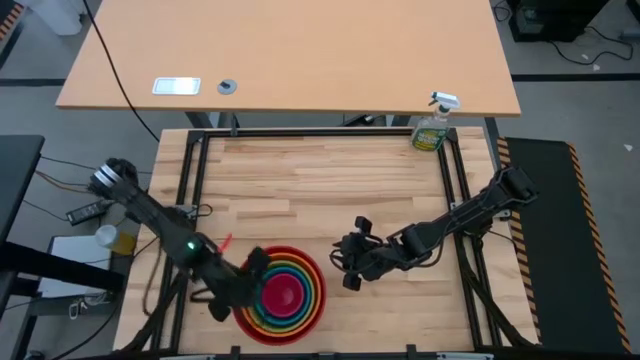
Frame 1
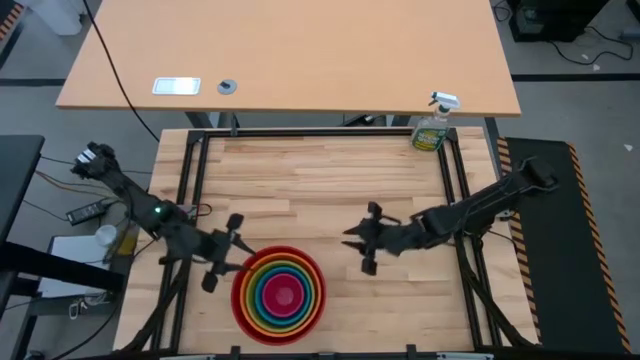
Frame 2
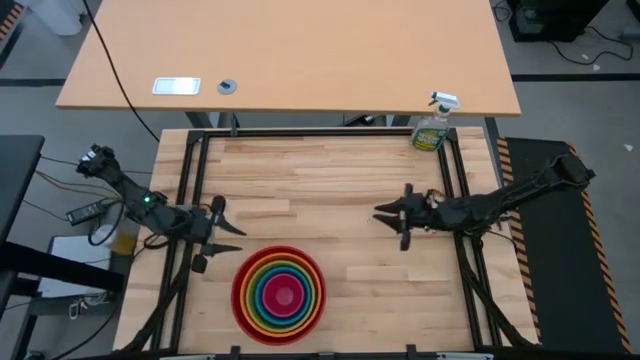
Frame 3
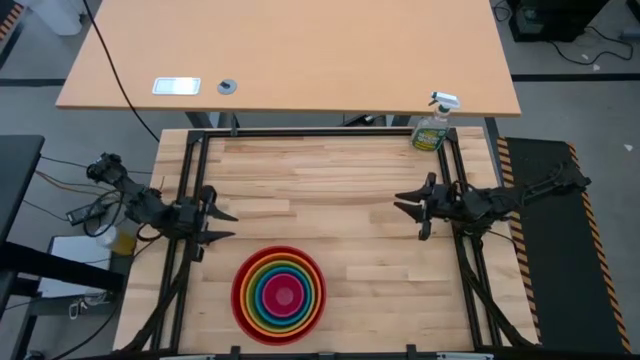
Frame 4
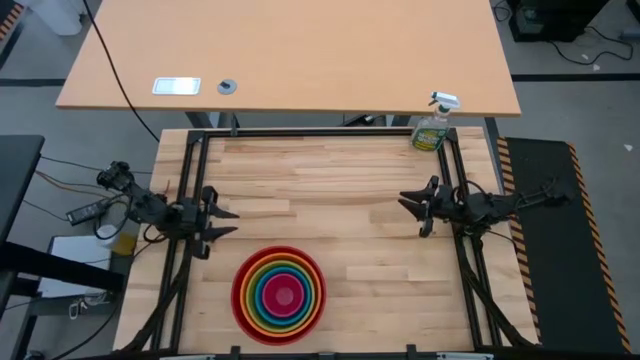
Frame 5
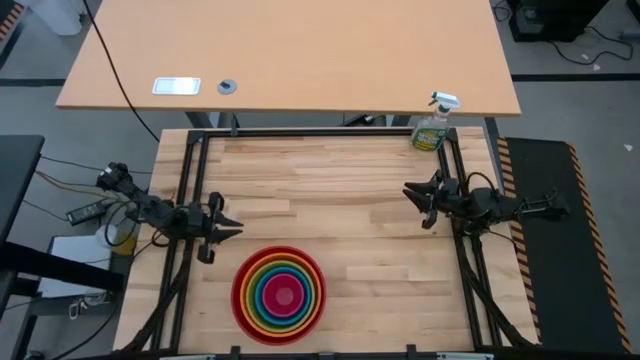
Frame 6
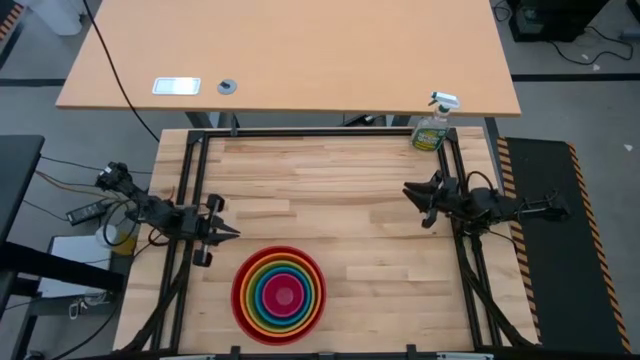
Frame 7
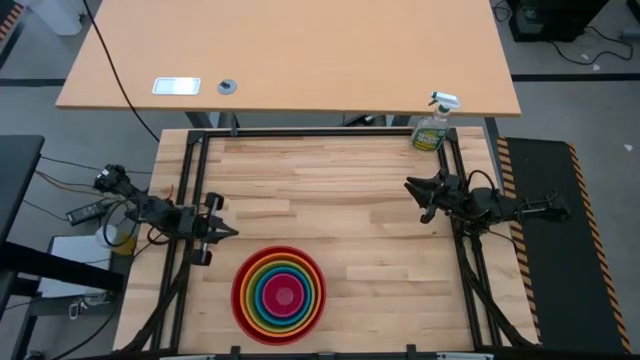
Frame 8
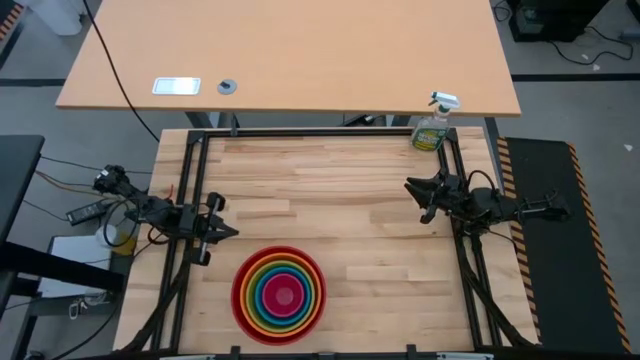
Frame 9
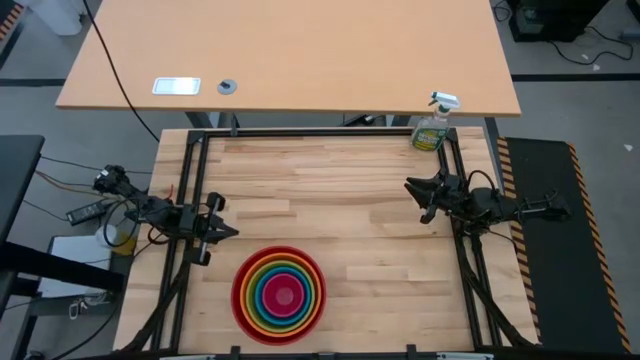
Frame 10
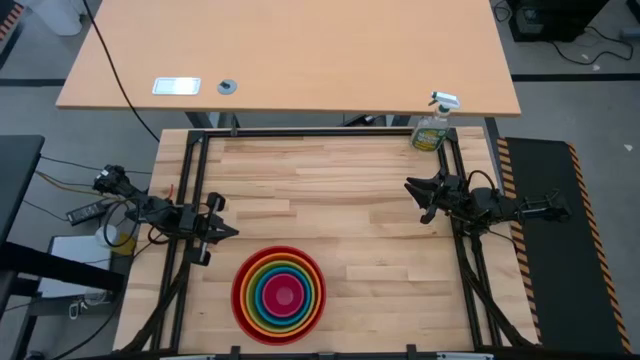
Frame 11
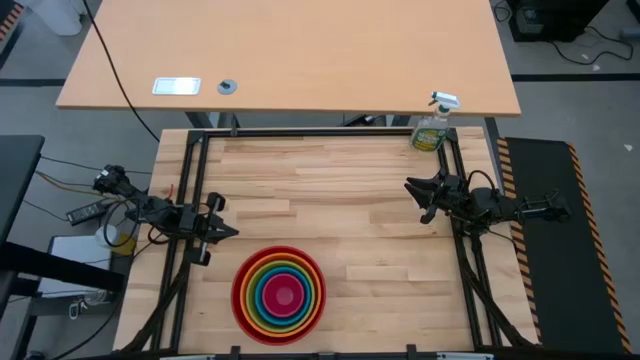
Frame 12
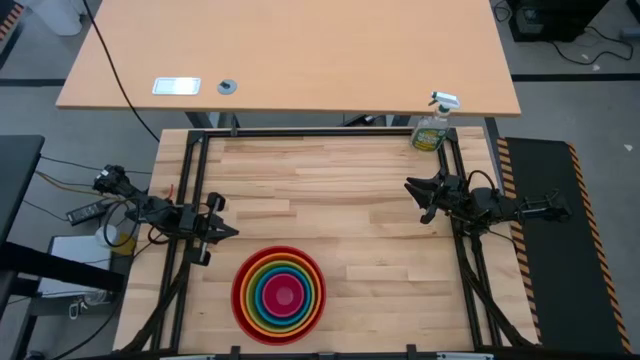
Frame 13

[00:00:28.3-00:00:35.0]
Return to Home Position
